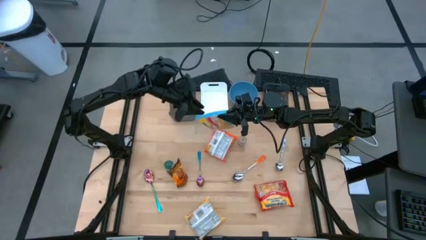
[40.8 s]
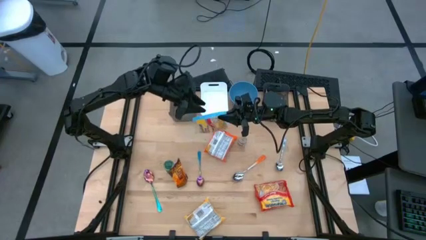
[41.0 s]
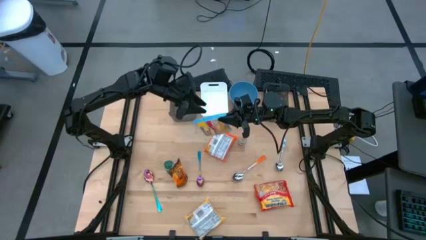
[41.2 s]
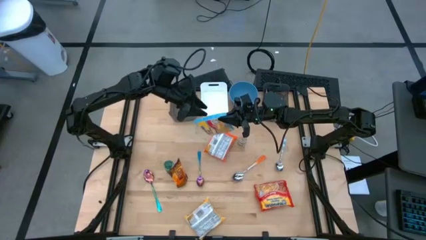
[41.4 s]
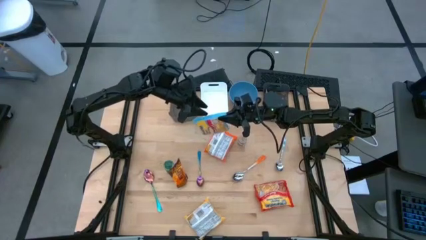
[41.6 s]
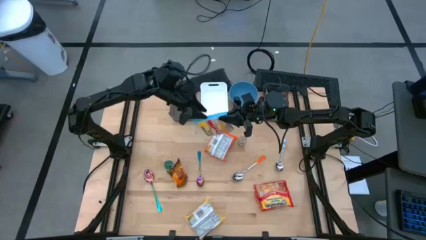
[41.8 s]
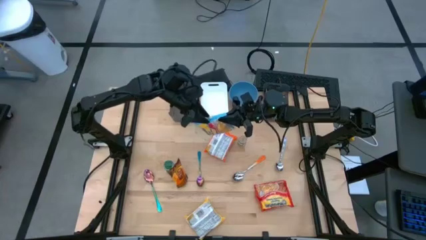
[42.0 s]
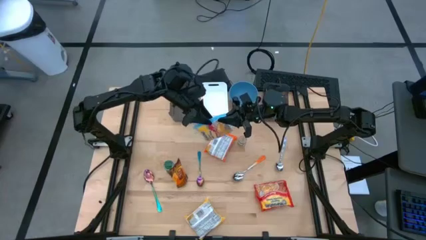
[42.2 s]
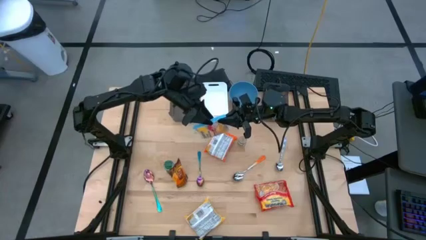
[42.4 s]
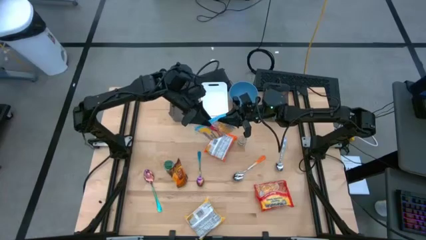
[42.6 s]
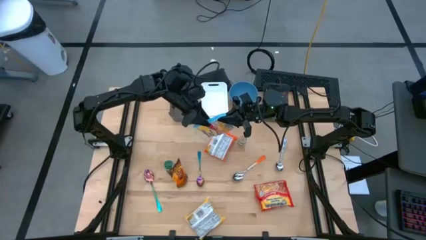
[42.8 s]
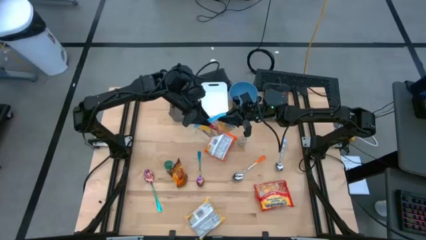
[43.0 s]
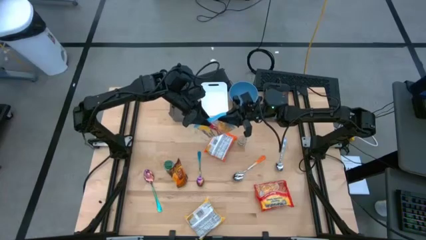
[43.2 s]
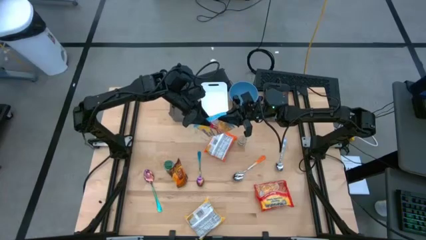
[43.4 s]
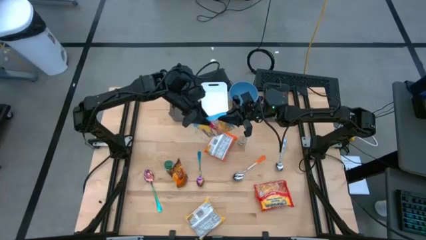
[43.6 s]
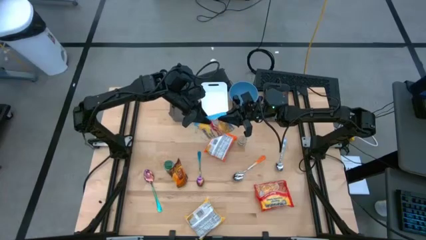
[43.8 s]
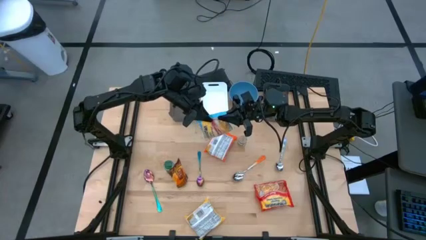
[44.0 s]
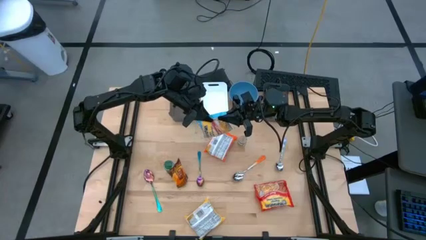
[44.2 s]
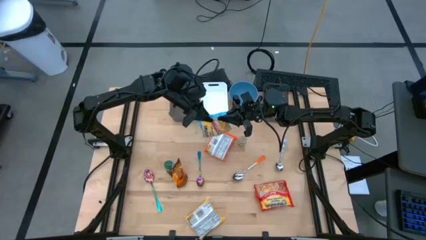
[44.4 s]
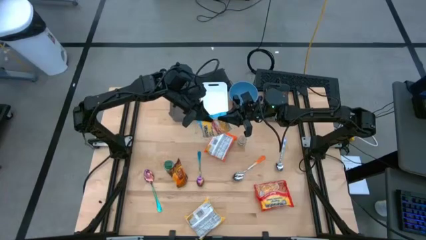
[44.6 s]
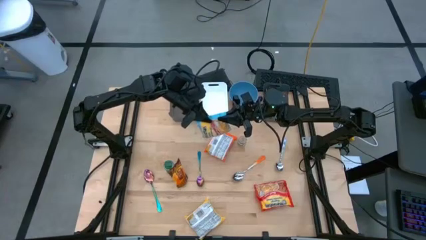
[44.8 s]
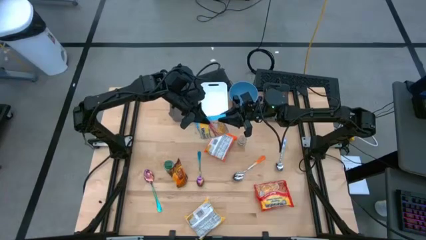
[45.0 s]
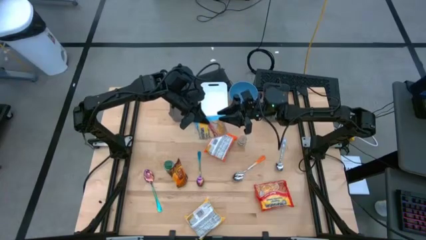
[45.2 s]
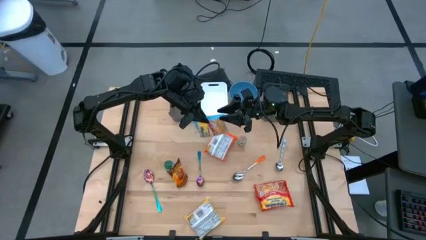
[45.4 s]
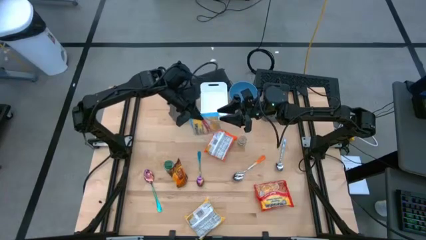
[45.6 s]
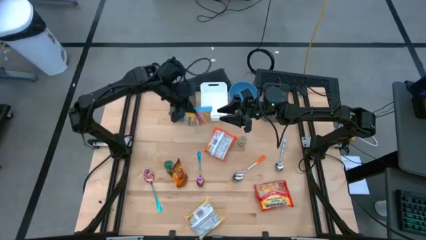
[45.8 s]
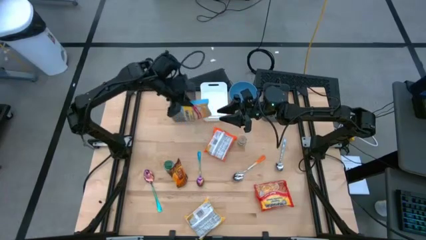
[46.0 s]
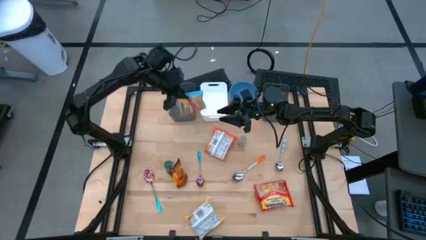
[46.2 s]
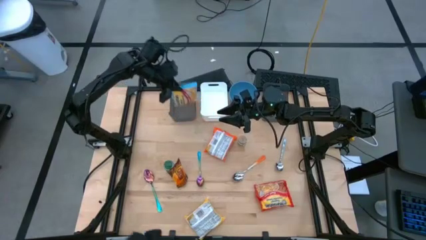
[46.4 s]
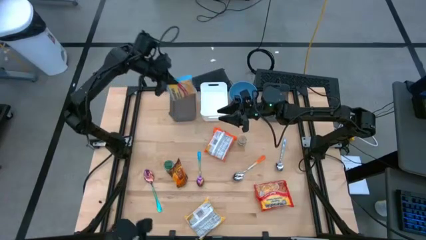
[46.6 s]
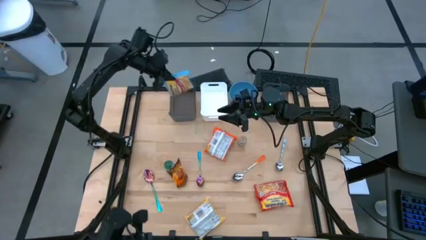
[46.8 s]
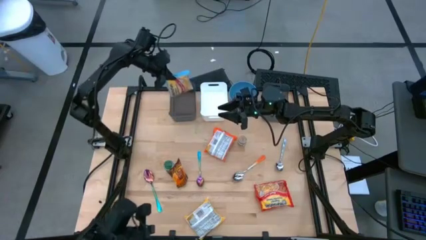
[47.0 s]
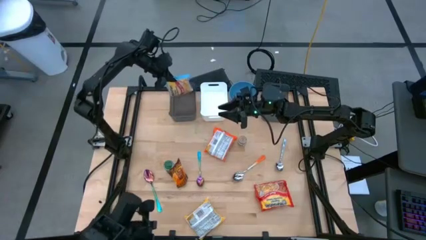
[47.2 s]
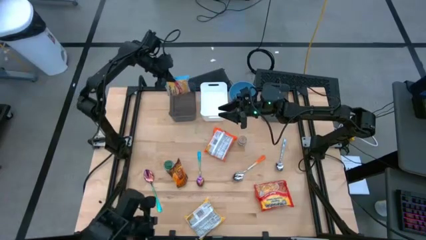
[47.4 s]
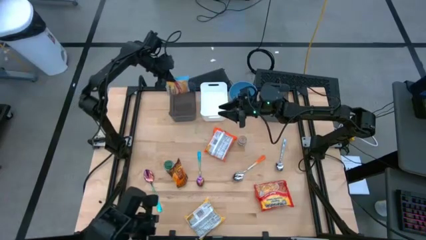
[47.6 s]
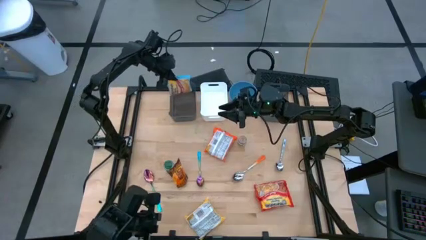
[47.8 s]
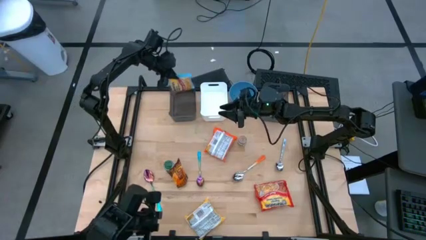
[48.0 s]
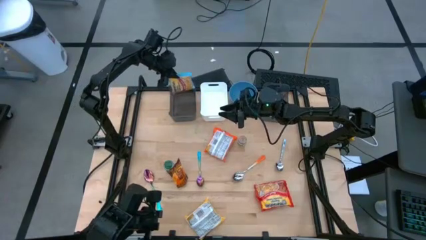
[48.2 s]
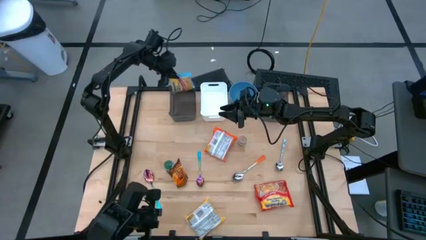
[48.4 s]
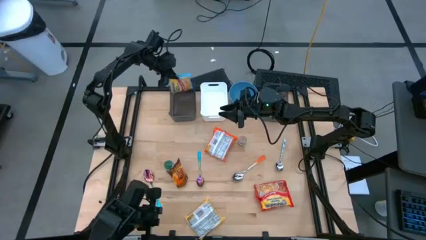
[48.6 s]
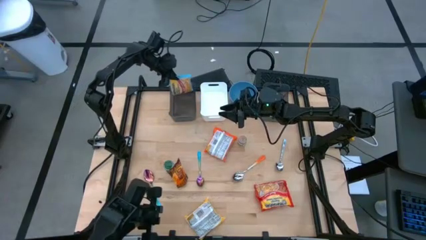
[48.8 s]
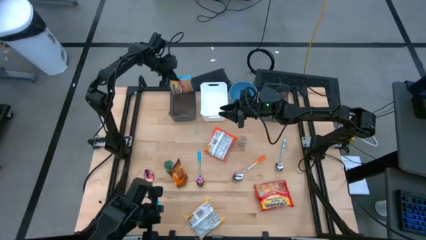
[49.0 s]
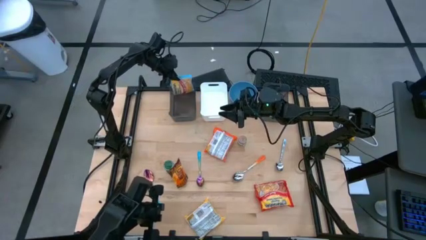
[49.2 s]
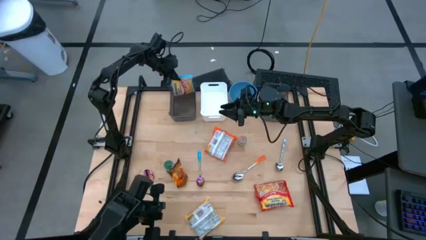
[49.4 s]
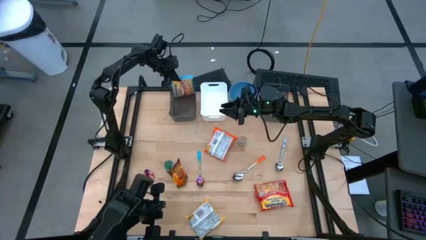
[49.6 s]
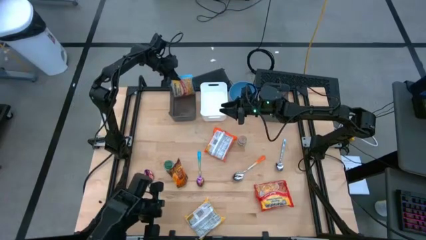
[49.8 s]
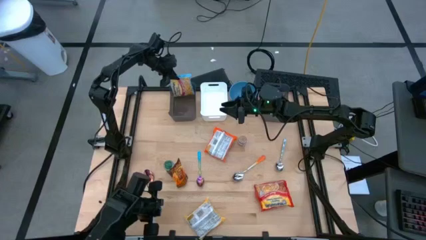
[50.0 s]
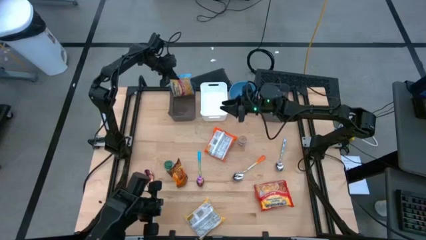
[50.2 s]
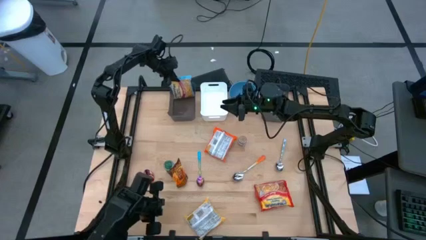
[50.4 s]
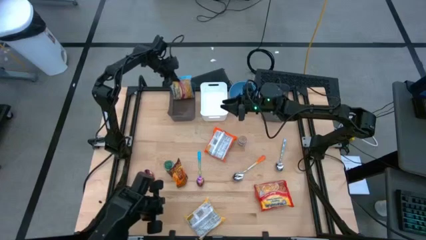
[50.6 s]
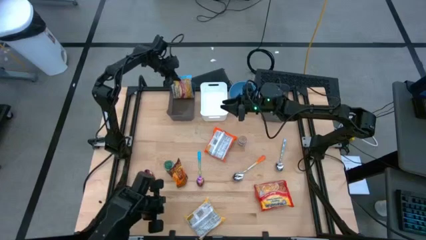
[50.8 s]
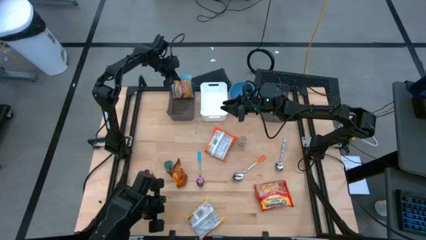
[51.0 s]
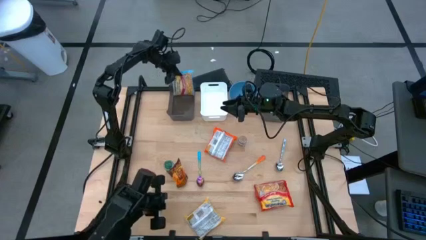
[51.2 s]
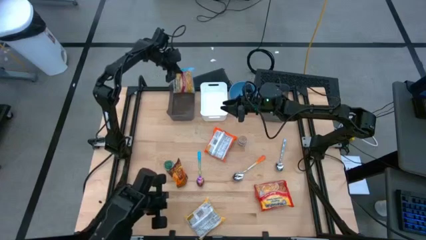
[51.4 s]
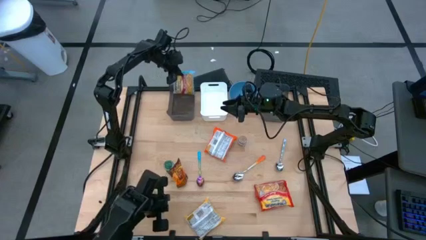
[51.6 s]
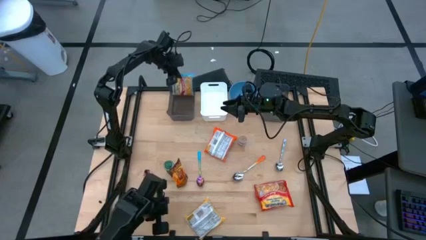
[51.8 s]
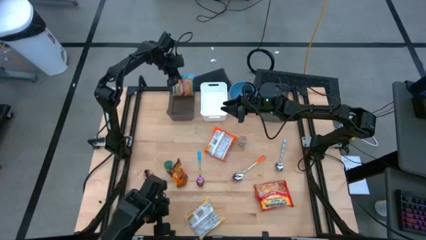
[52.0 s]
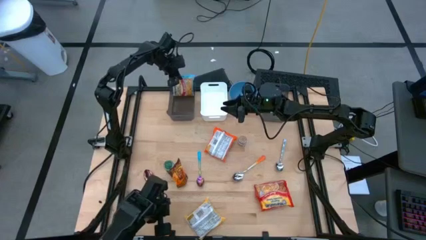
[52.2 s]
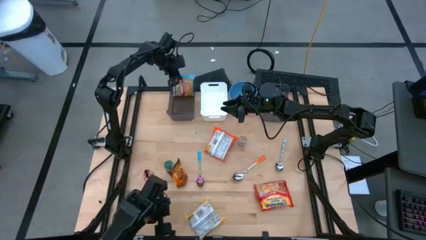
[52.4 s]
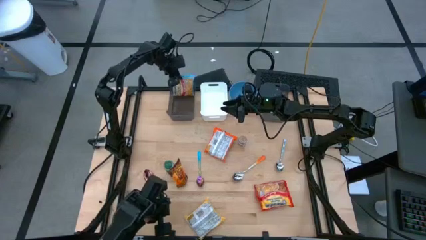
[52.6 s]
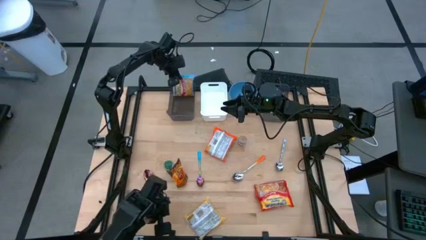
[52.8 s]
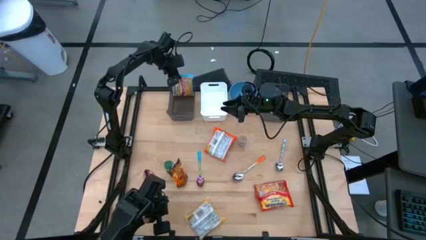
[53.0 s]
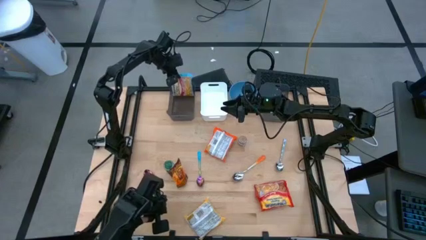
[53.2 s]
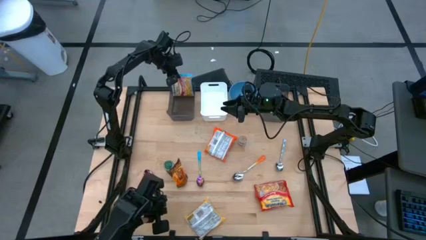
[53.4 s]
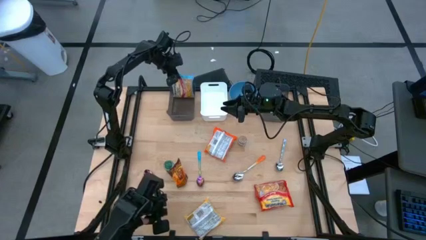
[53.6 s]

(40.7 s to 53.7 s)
Task: Pick & Place Food Item
Put the blue noodle pack into the left black bin

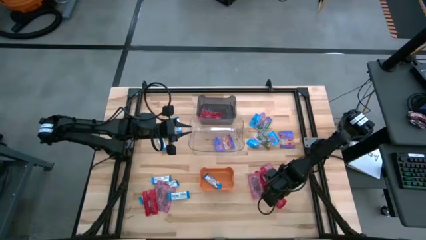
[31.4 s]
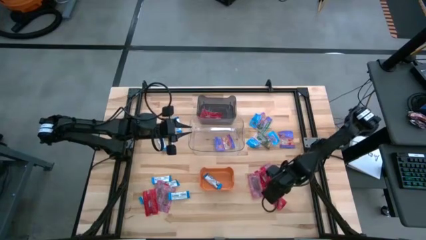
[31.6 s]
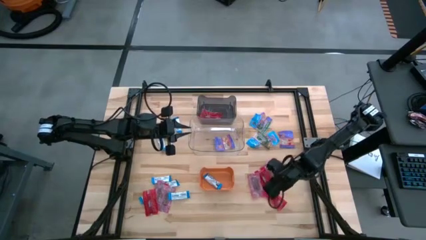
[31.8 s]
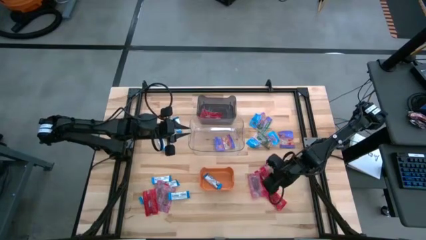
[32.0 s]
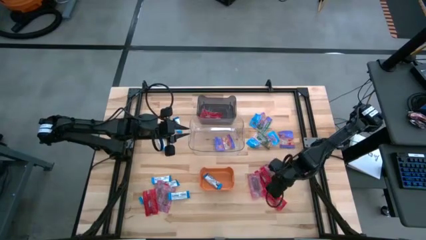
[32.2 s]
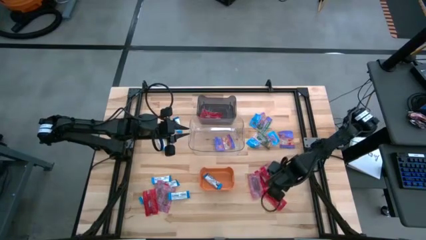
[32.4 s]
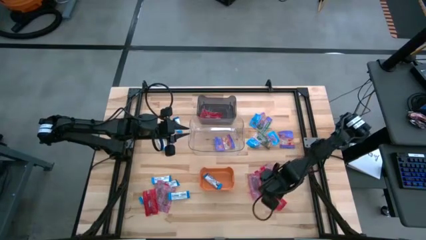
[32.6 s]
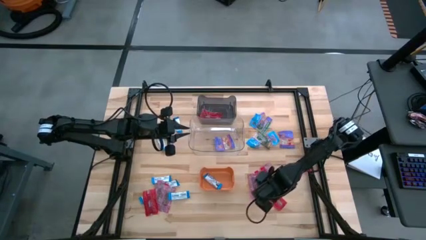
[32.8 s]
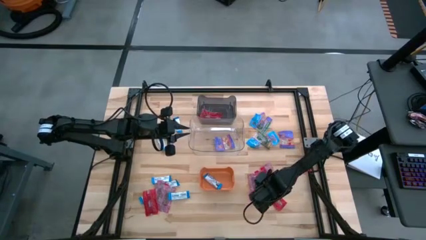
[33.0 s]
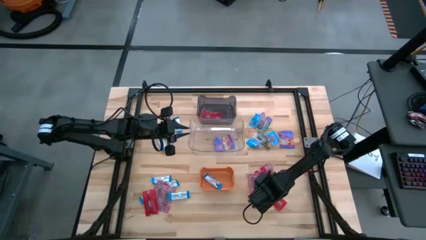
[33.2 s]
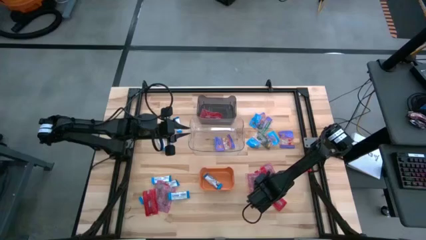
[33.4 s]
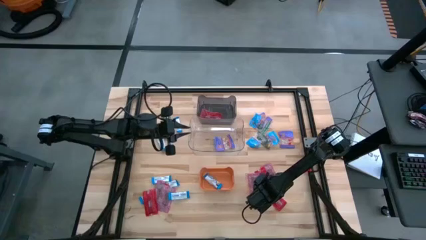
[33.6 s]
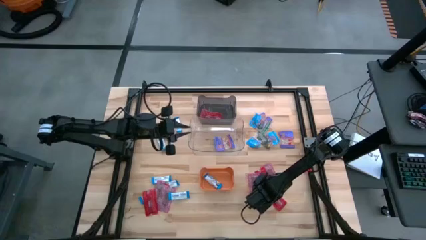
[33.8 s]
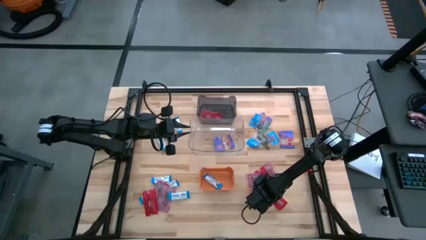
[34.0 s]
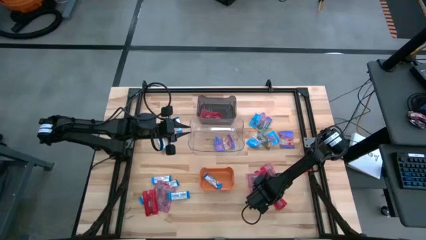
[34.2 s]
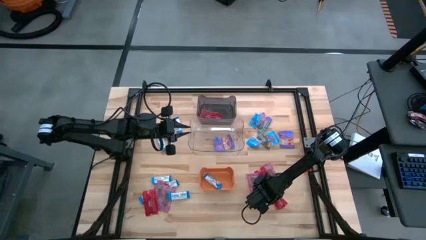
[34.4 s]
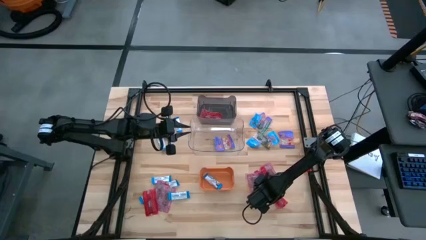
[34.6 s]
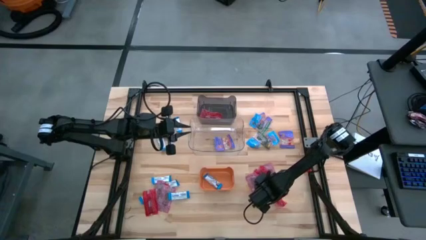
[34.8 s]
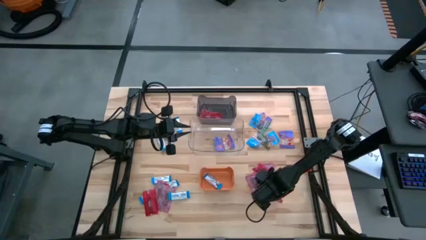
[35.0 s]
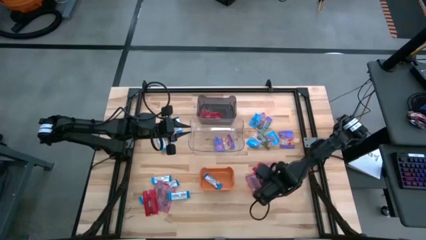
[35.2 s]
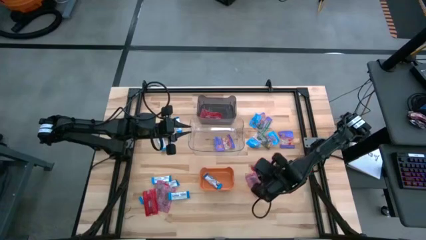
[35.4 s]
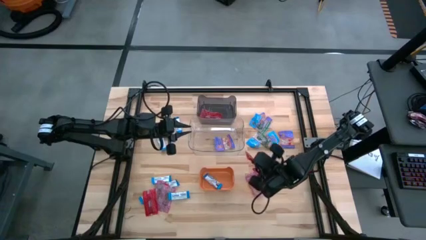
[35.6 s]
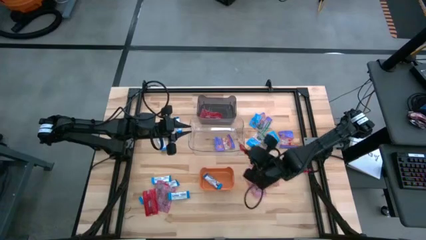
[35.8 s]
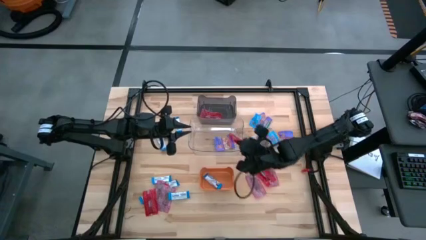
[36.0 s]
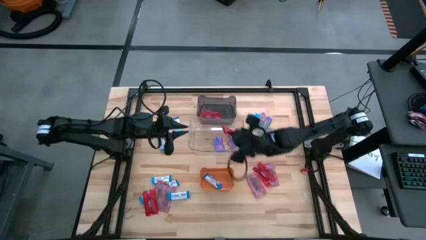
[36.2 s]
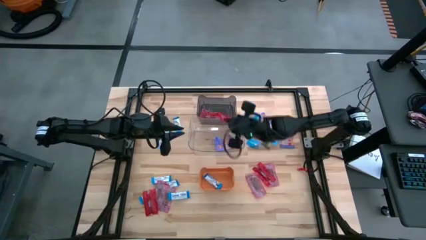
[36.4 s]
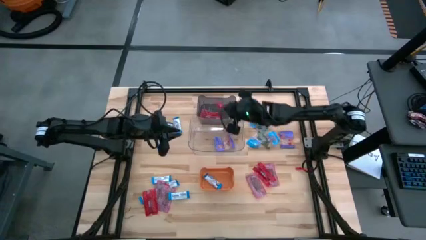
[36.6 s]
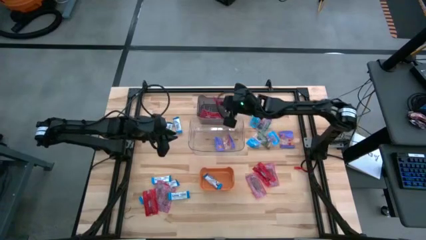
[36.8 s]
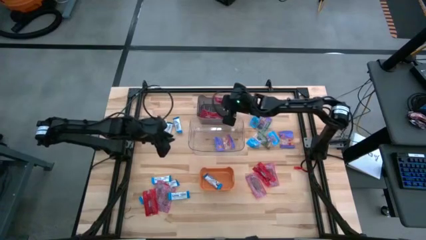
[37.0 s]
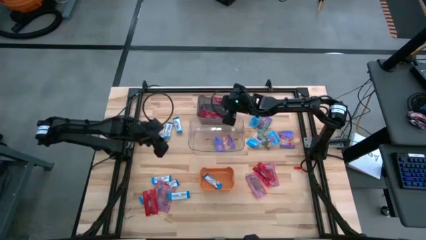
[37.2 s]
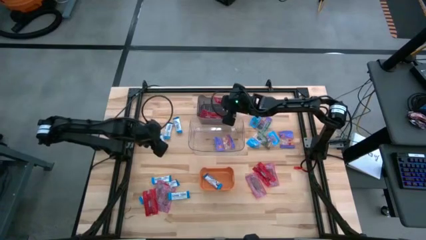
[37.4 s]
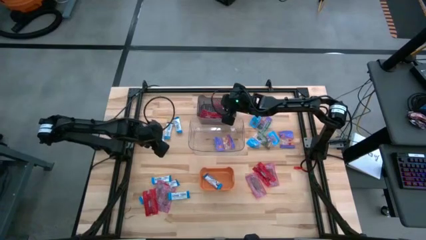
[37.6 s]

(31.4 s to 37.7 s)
Task: Sort candy
Put the red candy into the black transparent bin
